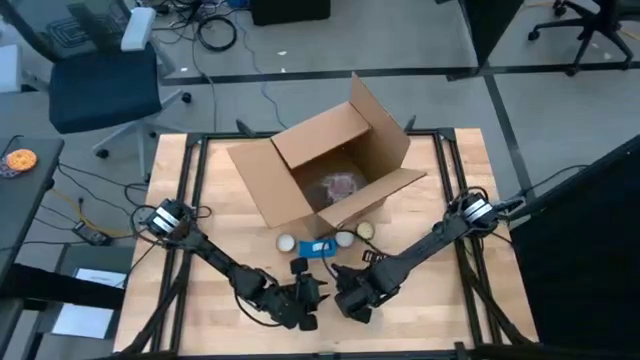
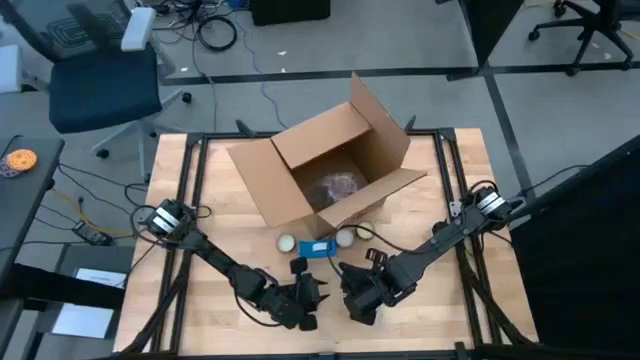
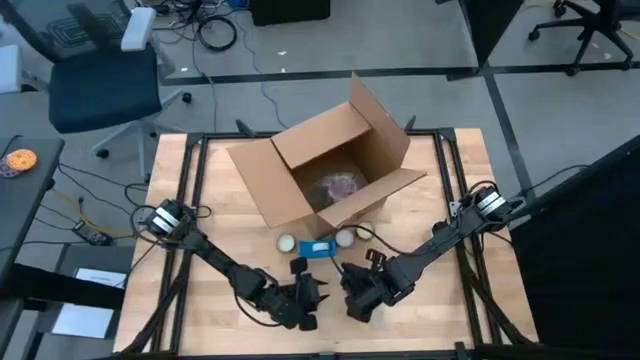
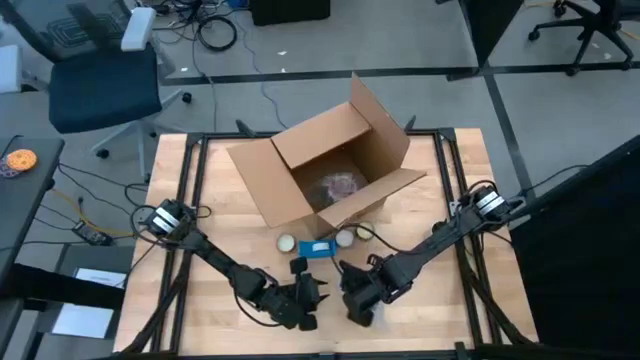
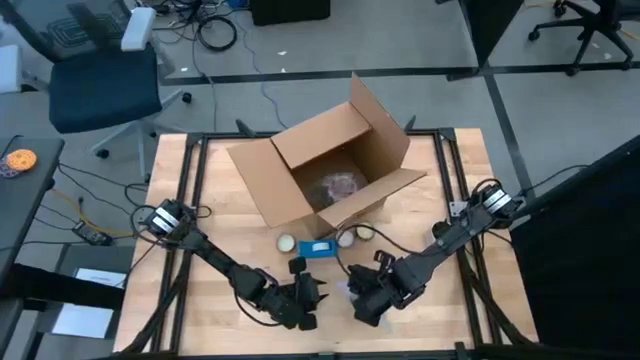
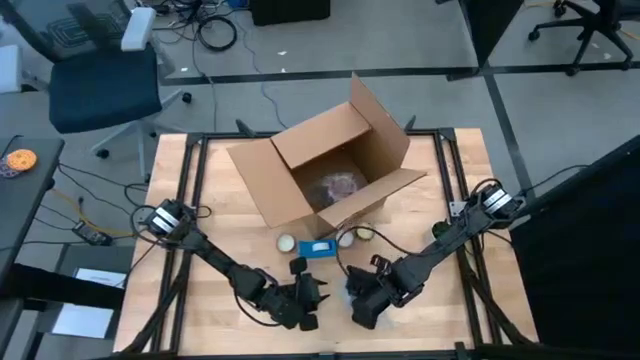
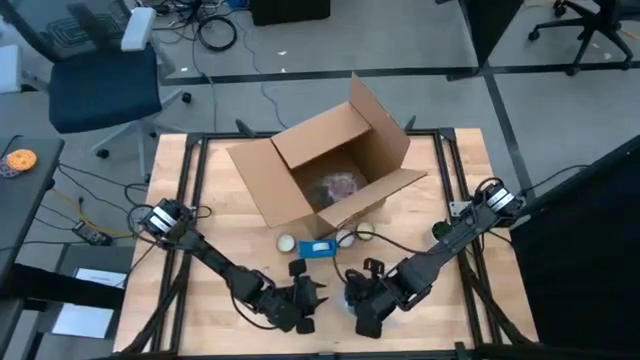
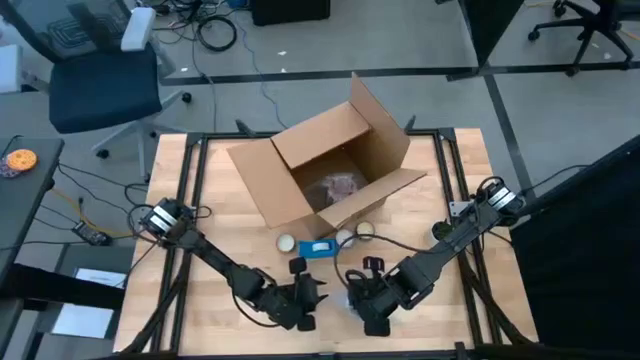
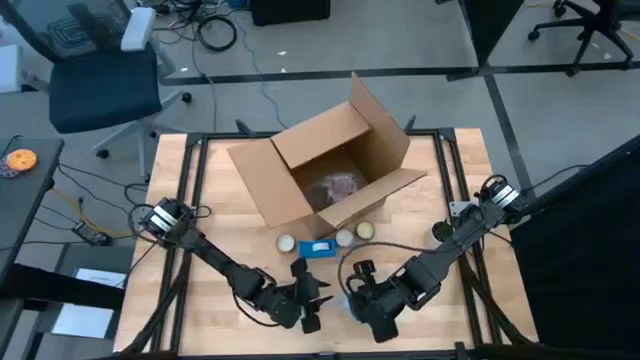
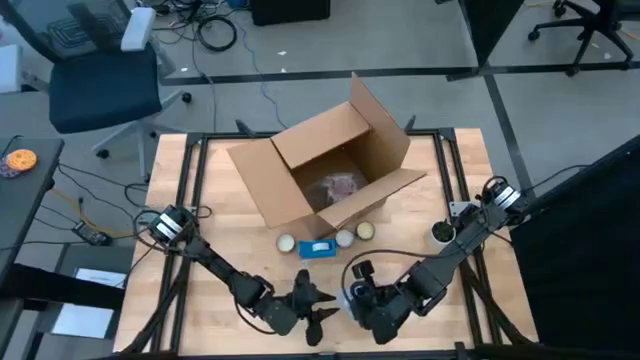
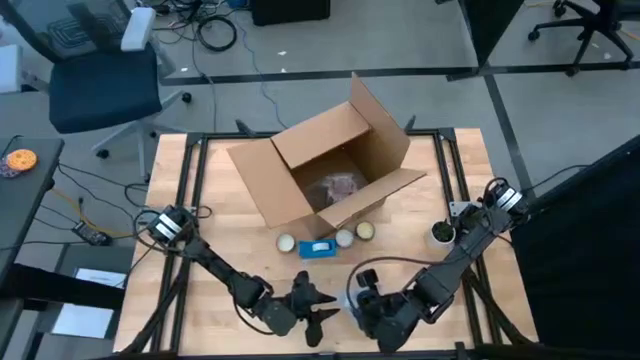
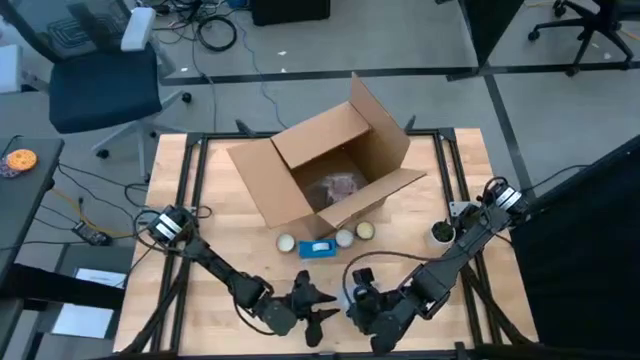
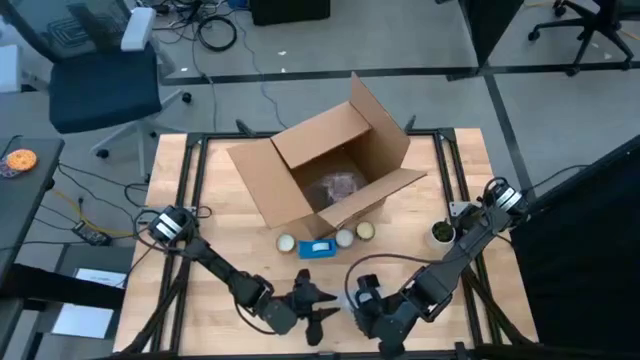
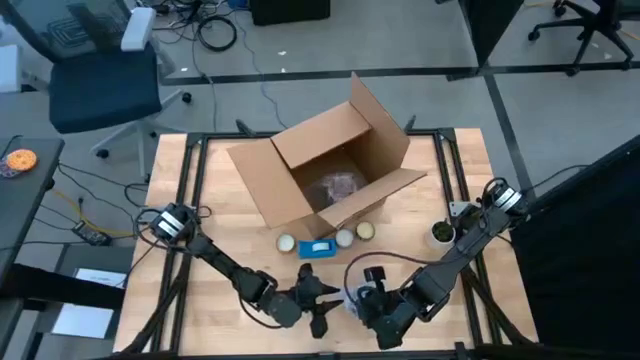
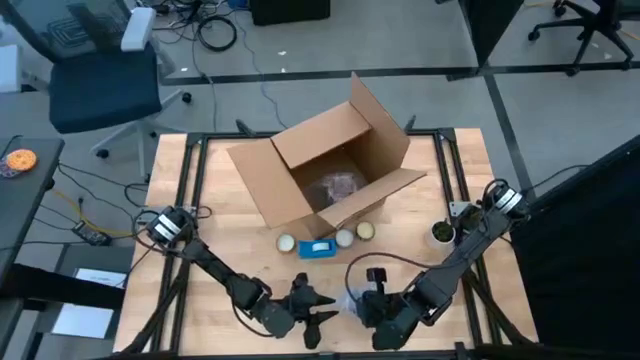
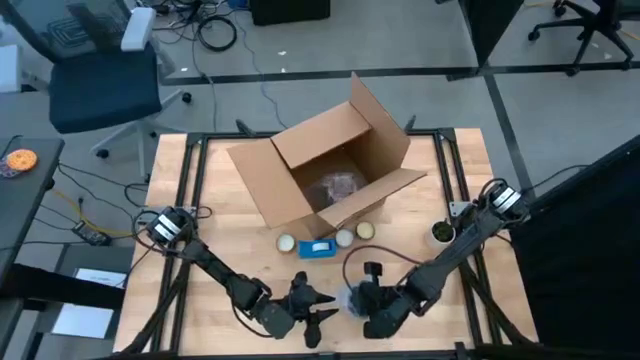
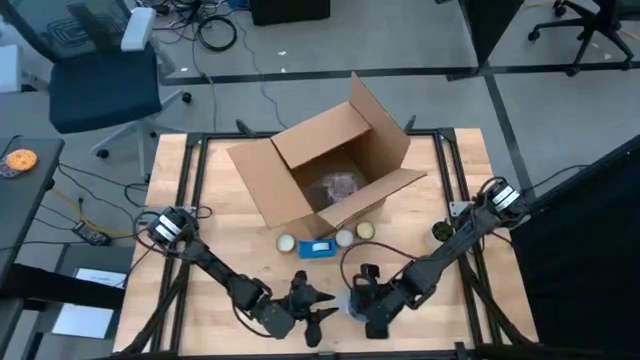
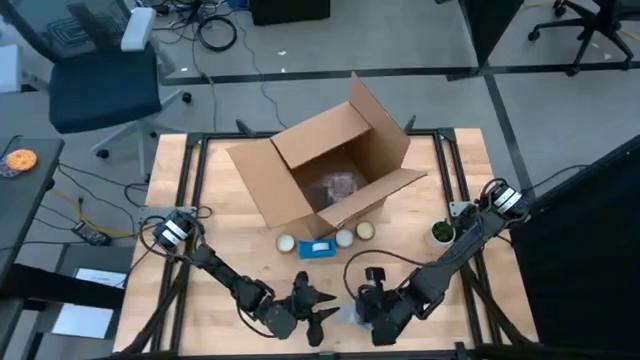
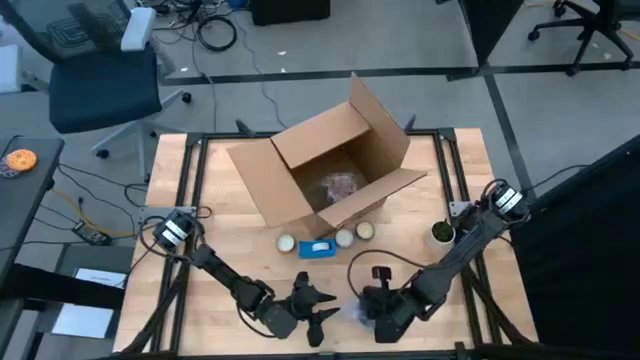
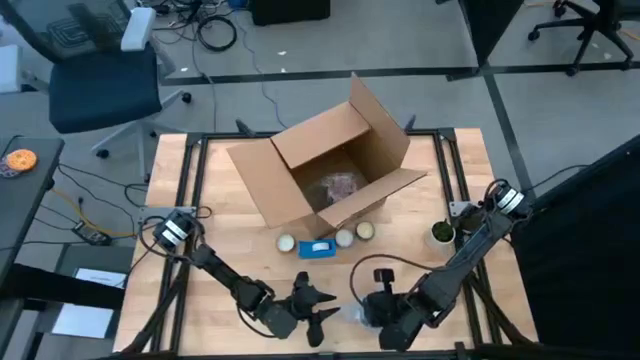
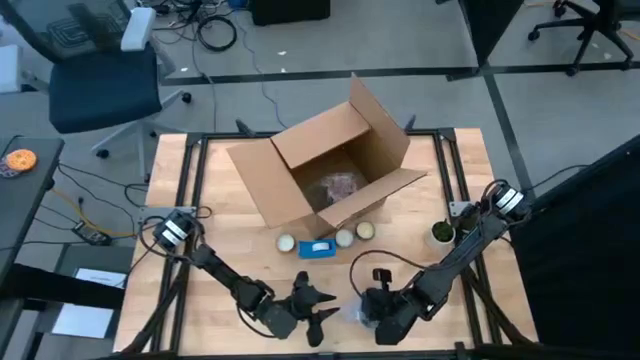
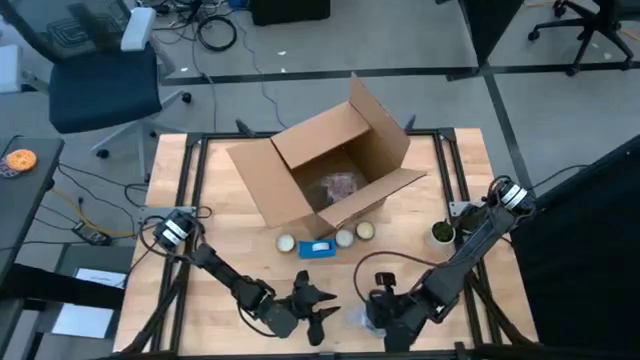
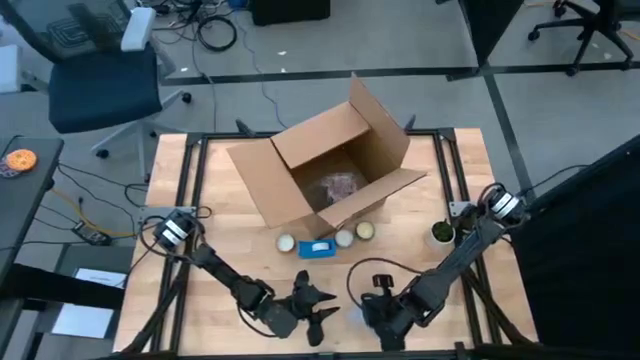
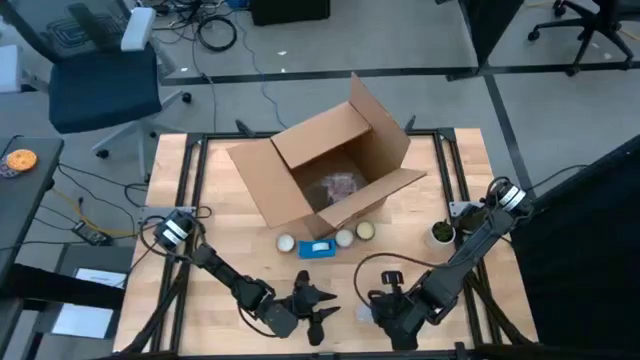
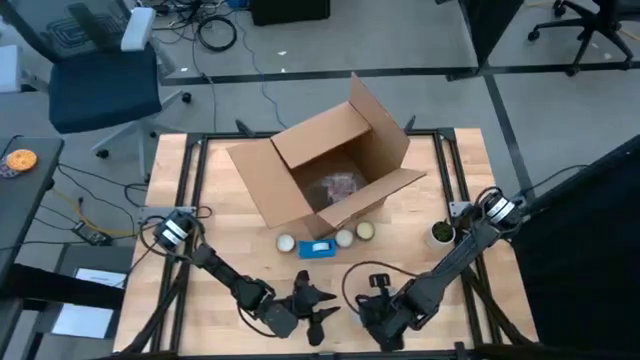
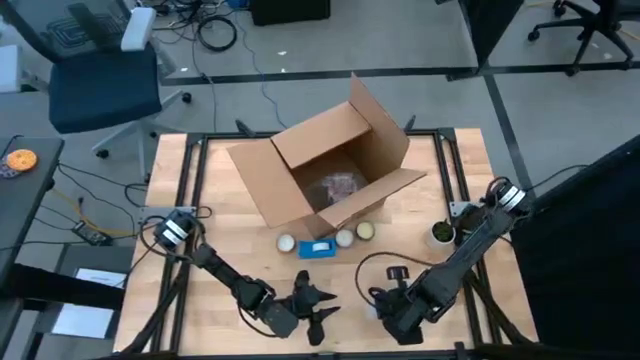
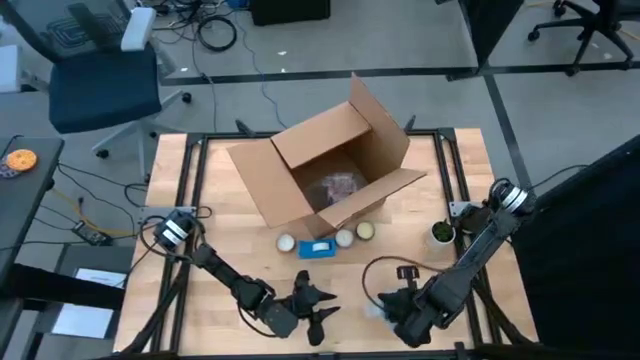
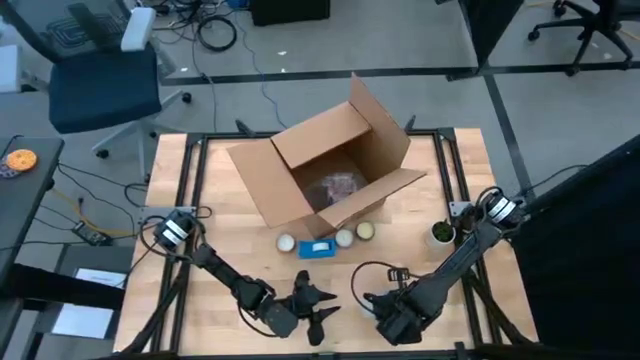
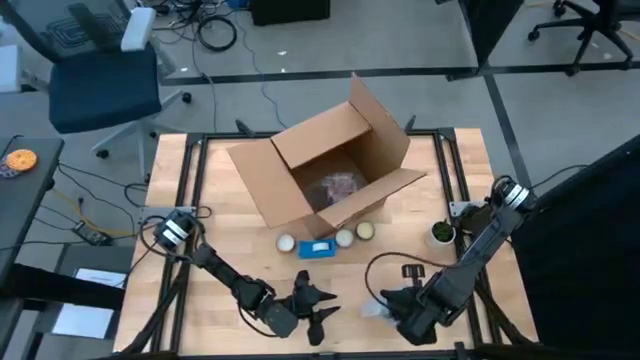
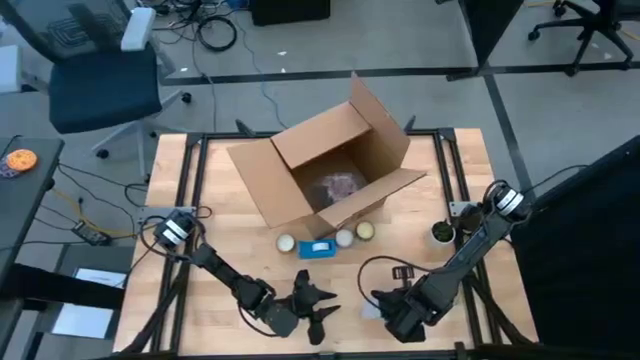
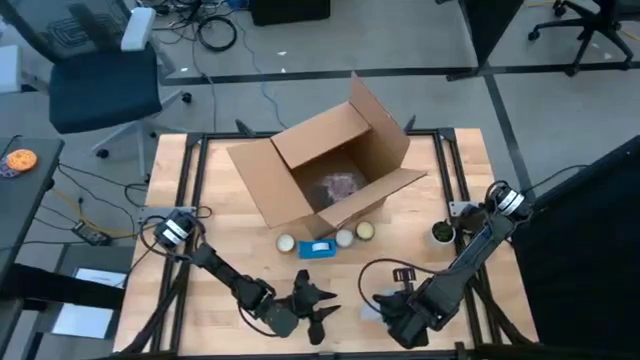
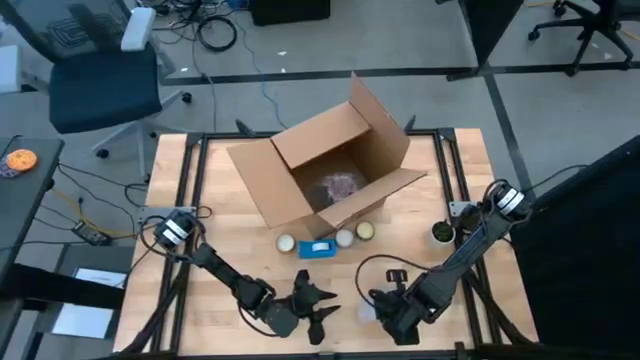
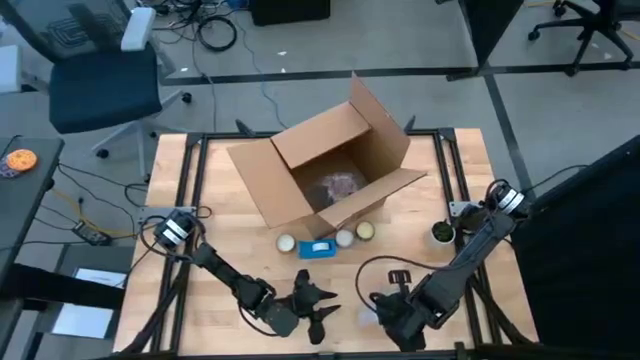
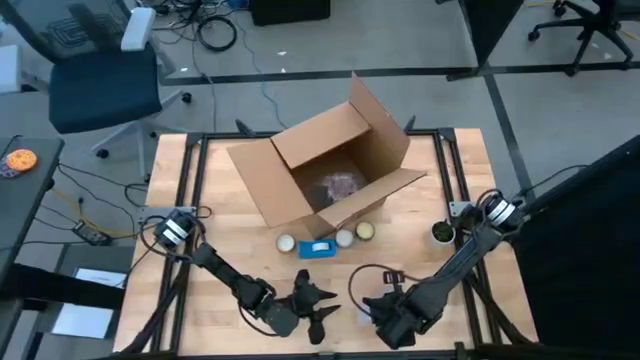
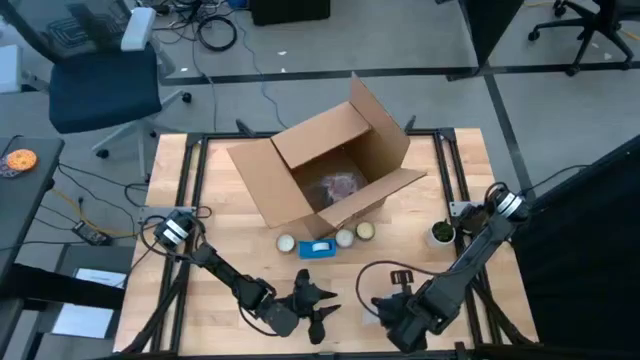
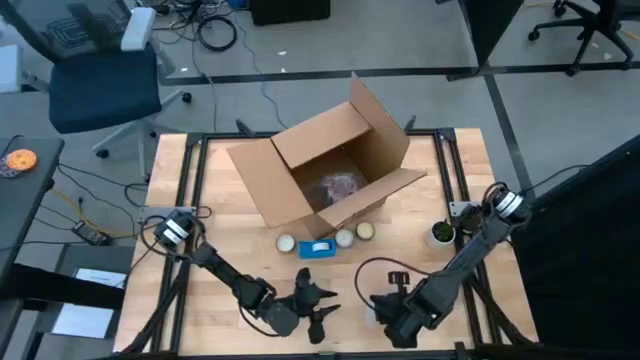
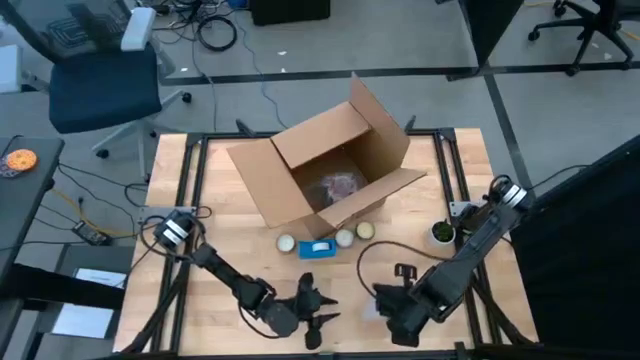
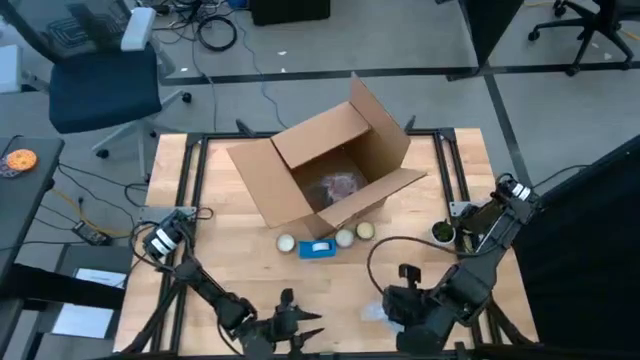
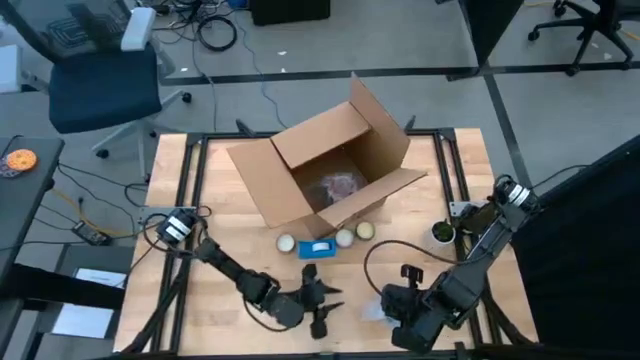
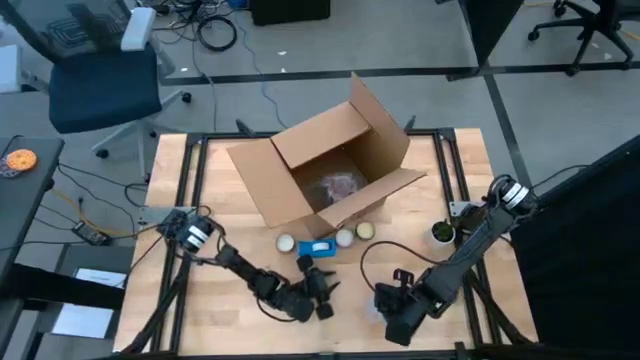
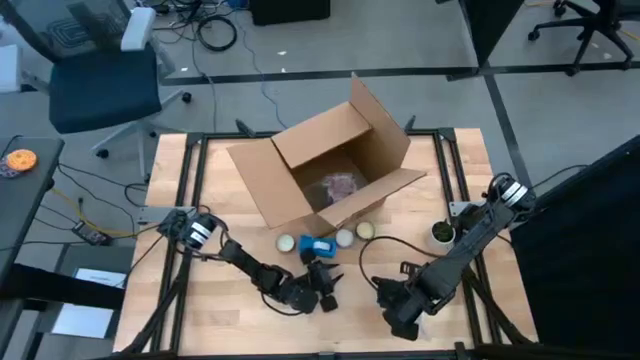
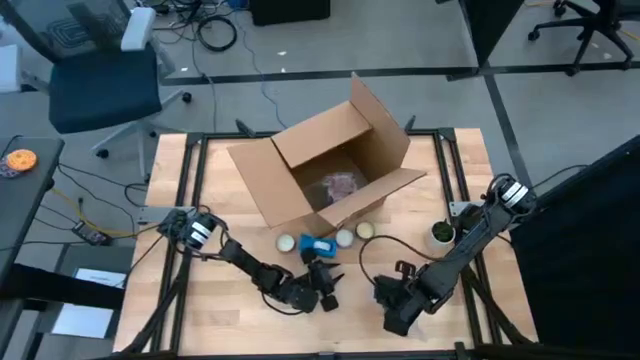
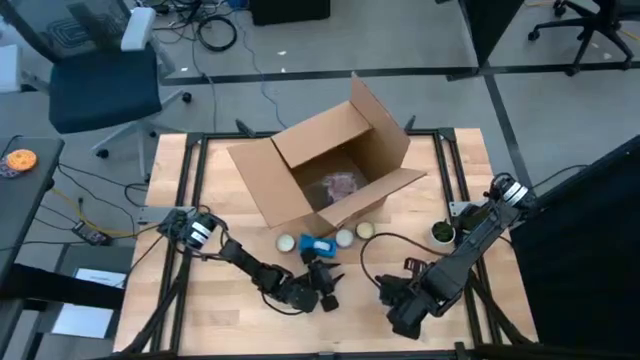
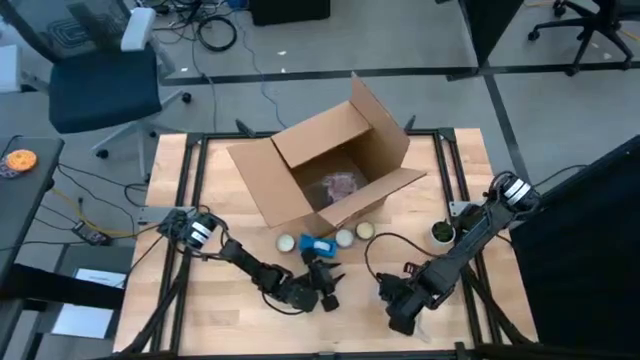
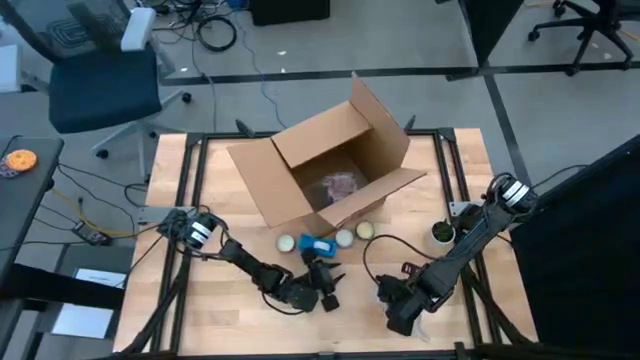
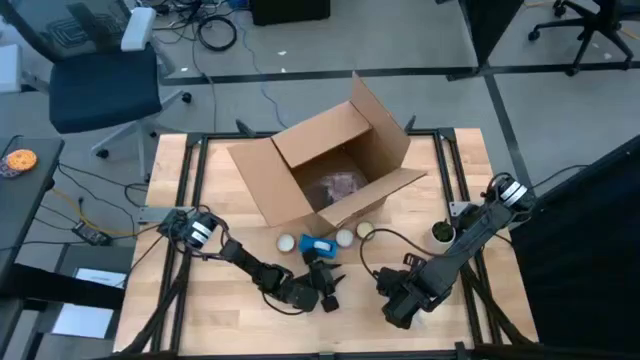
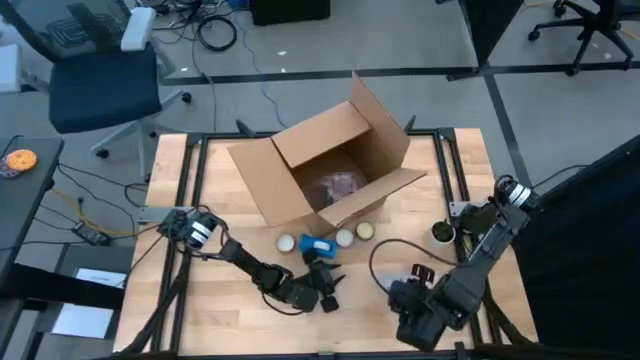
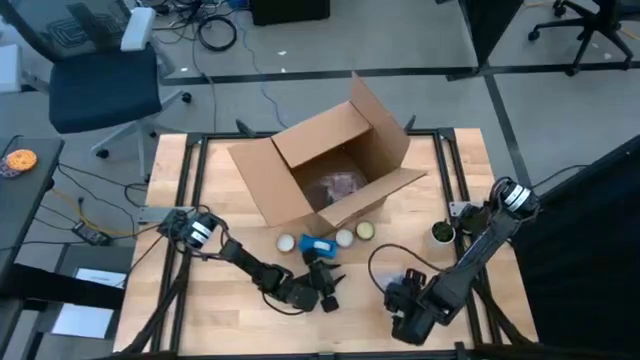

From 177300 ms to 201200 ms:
Task: wrap mug
Wrap the purple mug with the bubble wrap
